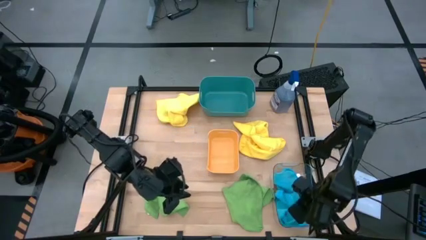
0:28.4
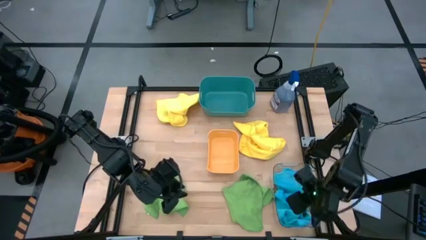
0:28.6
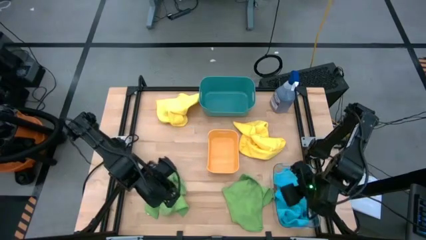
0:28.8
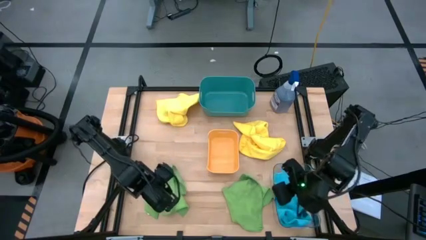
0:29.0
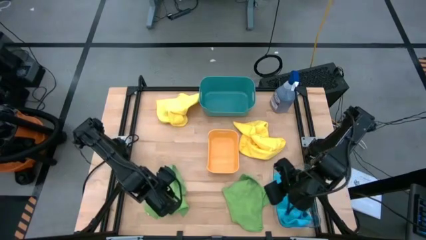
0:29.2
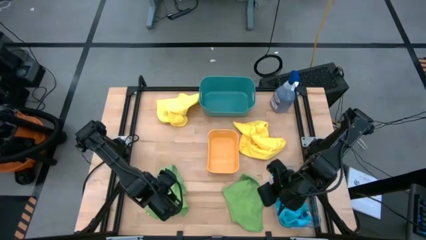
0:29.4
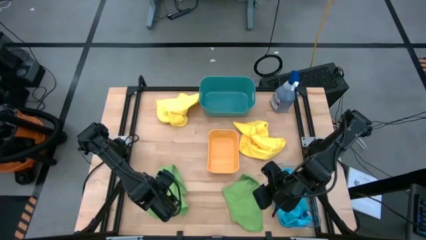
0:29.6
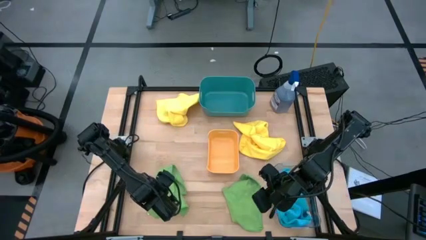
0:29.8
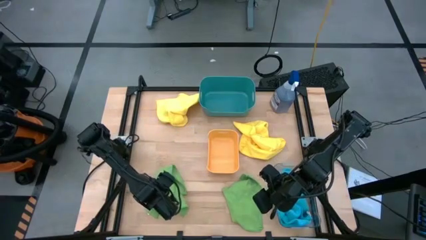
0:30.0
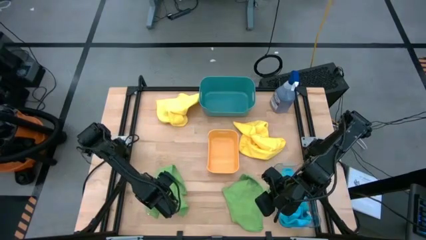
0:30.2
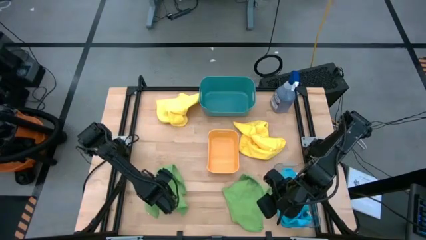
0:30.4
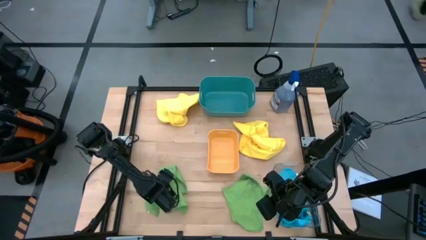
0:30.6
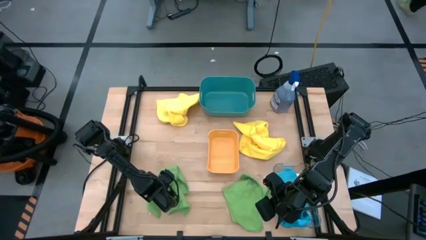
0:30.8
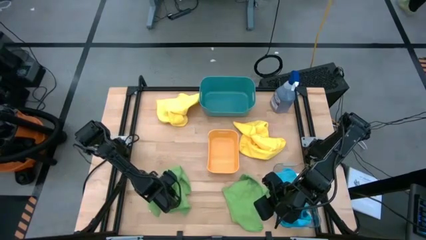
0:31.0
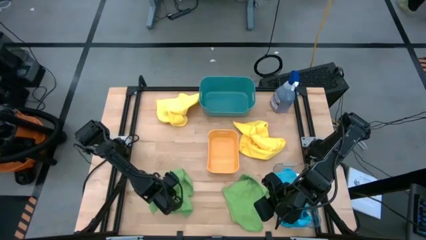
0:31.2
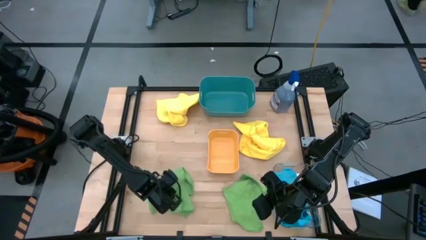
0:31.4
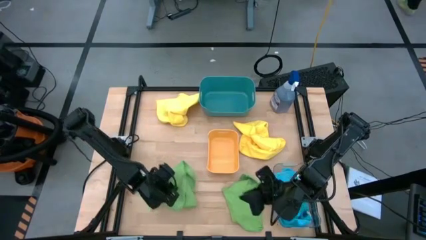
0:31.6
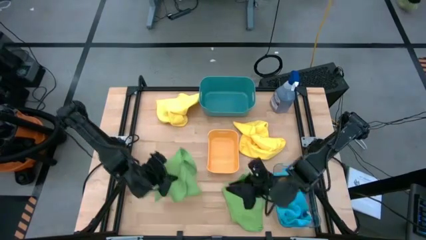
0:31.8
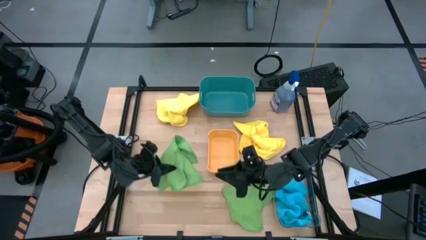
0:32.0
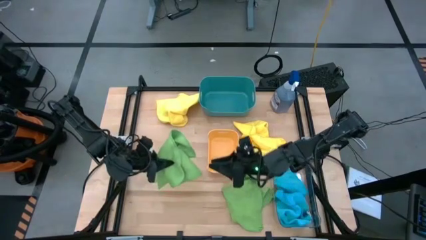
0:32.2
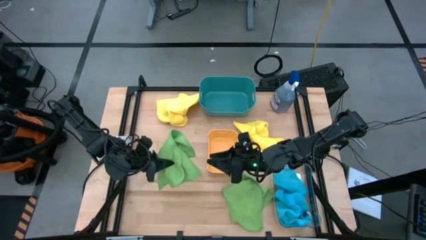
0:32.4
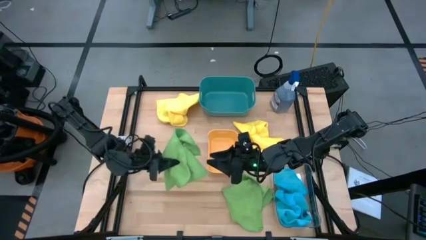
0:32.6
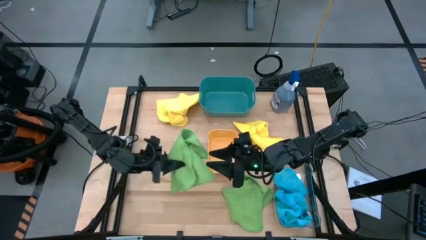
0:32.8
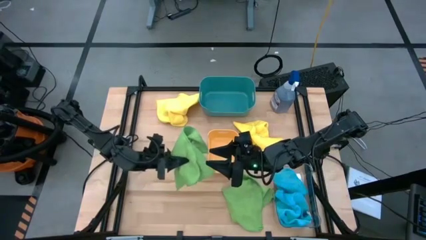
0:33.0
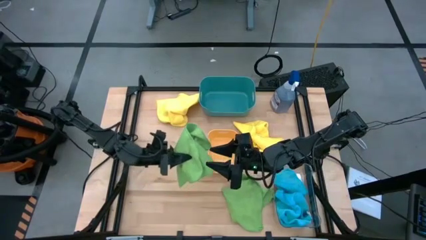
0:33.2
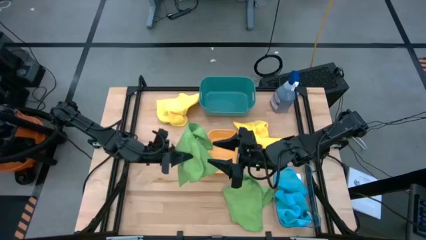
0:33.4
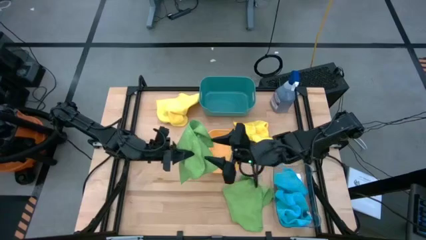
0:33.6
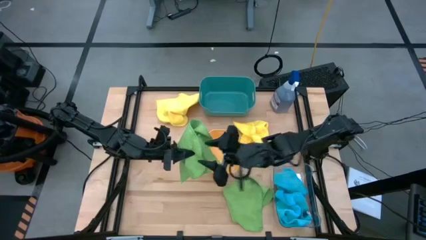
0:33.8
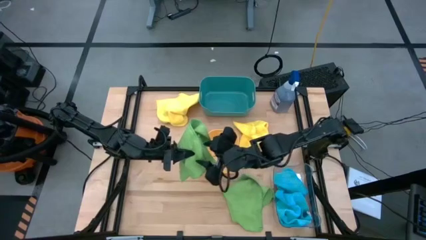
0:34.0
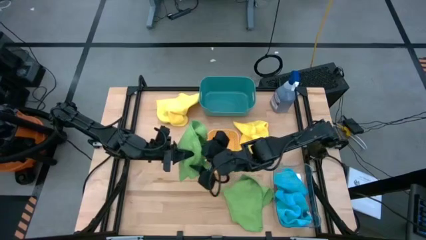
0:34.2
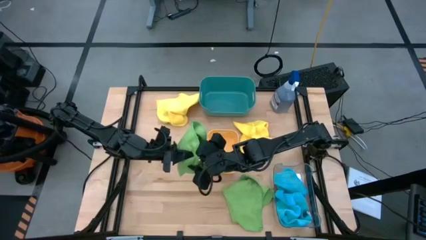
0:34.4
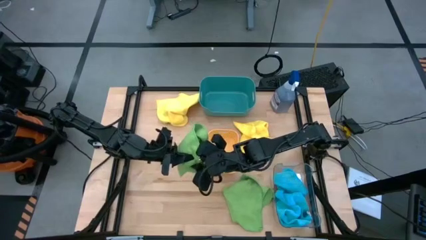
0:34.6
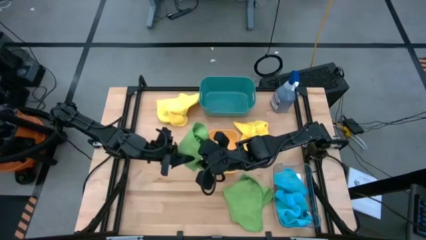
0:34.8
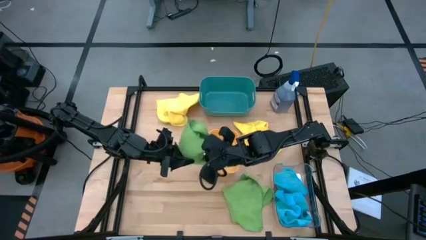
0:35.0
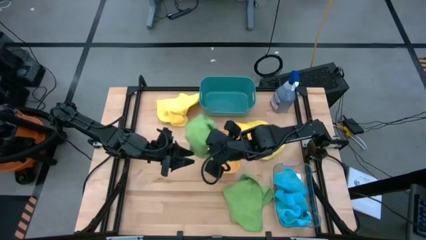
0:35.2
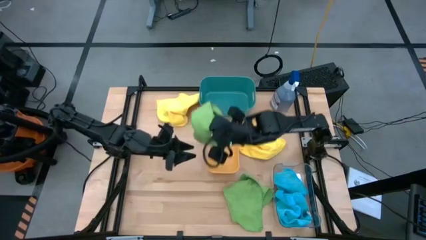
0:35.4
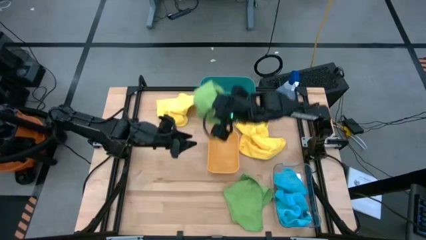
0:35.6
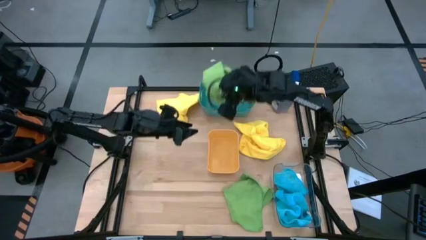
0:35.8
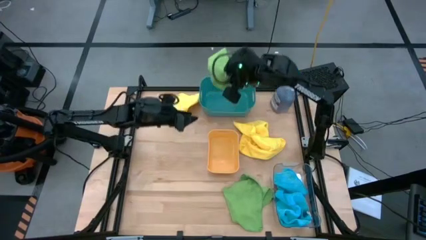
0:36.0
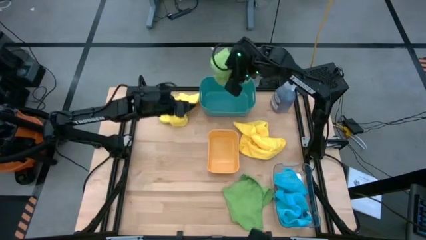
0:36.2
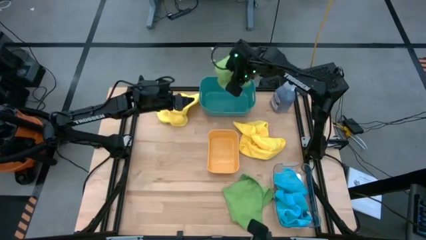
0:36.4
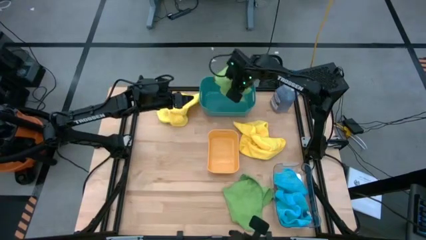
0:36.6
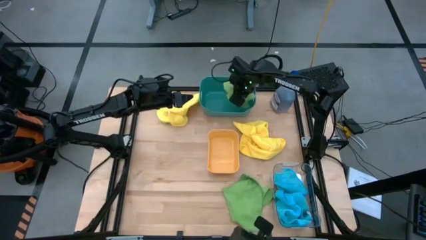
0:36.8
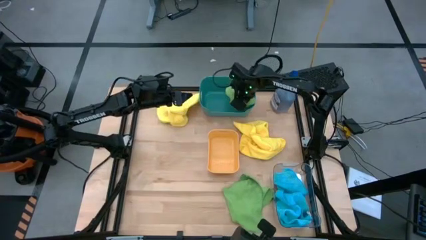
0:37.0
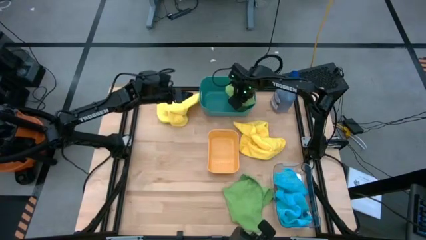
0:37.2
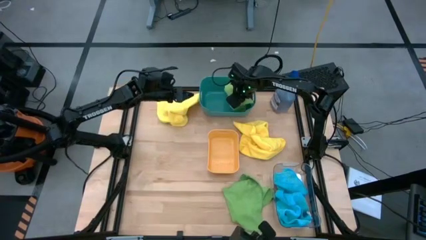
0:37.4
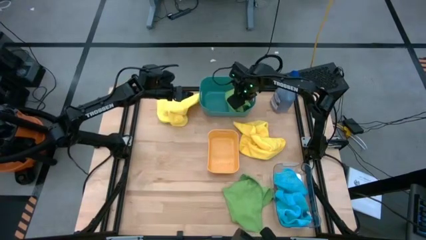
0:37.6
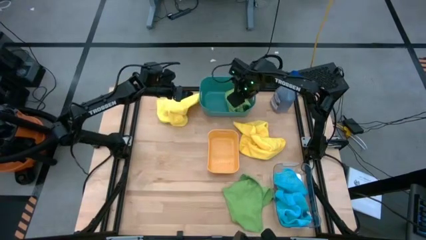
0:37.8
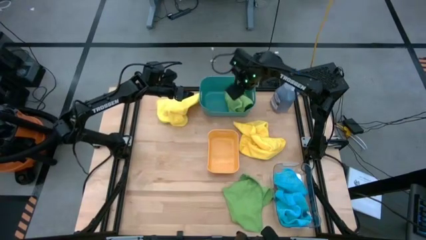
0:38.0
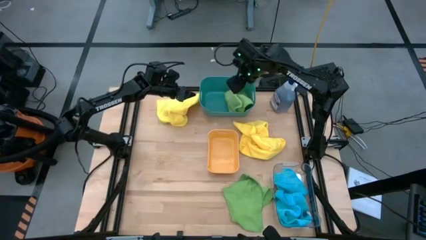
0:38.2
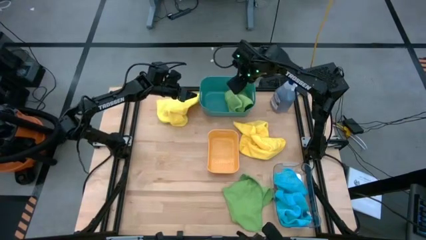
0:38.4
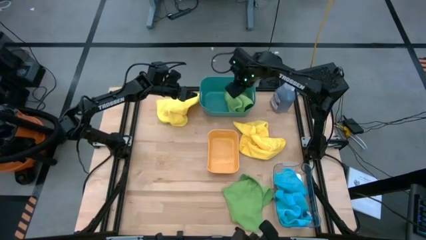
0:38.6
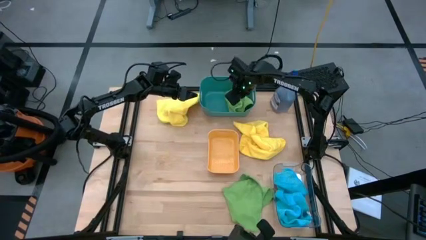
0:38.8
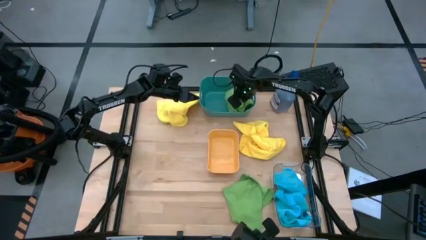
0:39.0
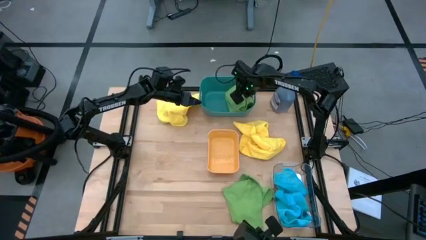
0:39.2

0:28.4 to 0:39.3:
Task: Sort microfiber towel by color & place in baskets
Put the left green microfiber towel into the blue bin

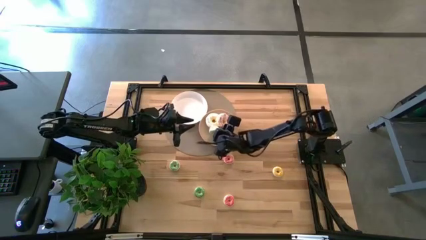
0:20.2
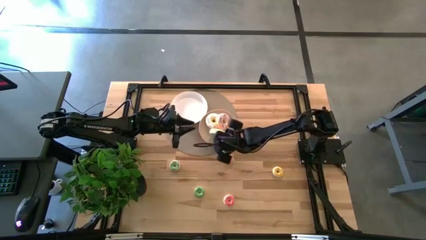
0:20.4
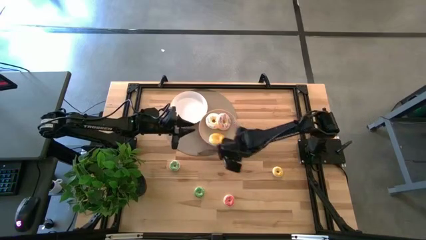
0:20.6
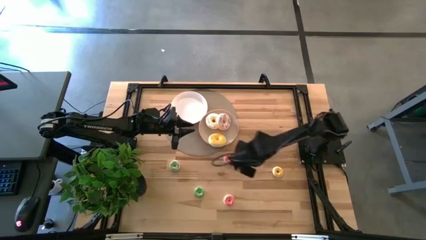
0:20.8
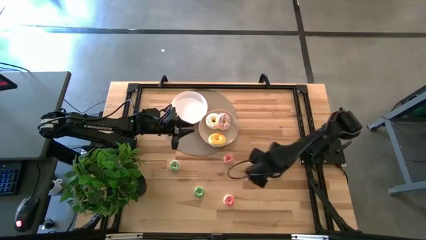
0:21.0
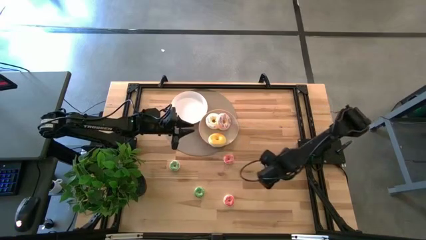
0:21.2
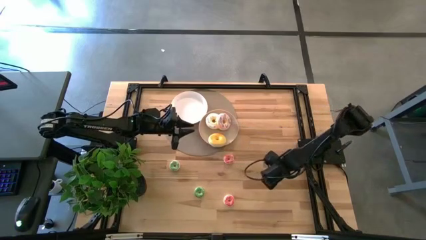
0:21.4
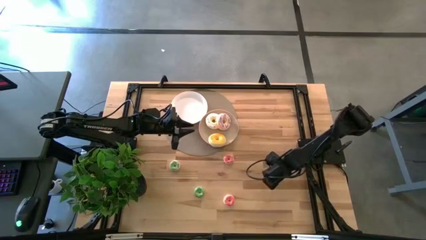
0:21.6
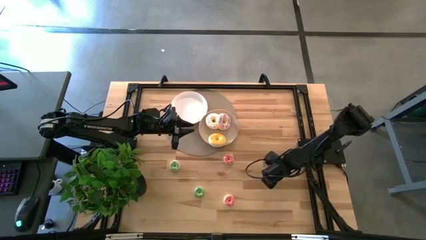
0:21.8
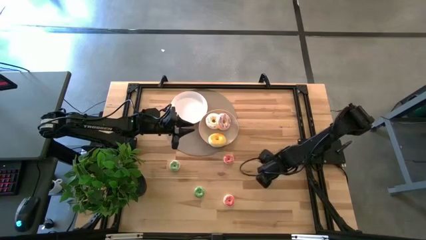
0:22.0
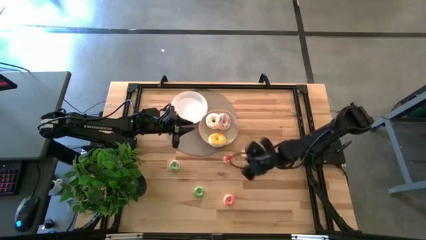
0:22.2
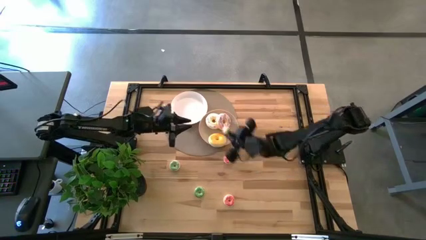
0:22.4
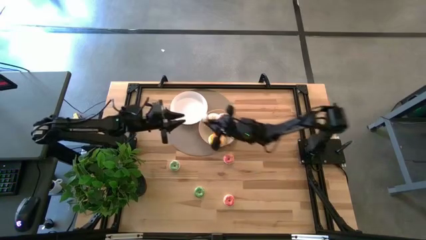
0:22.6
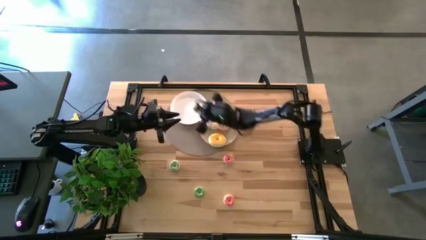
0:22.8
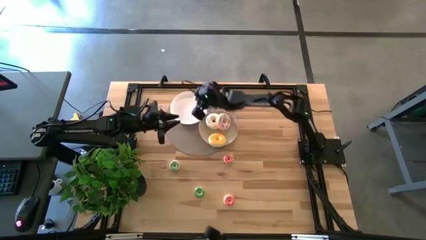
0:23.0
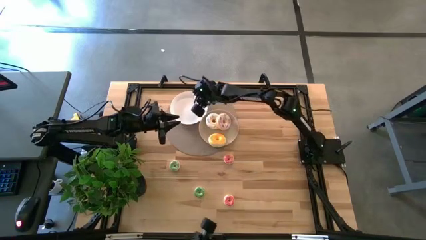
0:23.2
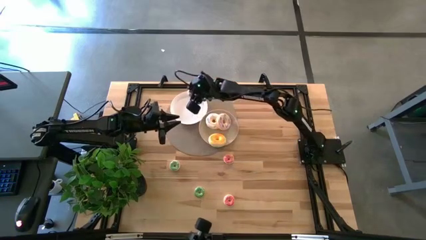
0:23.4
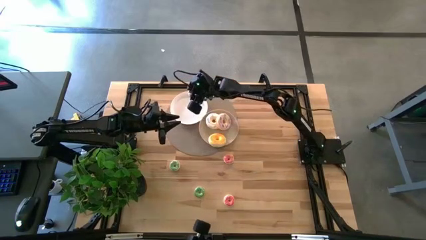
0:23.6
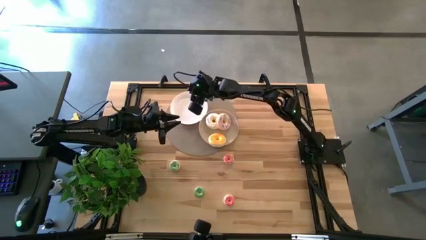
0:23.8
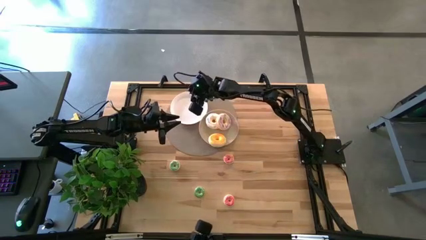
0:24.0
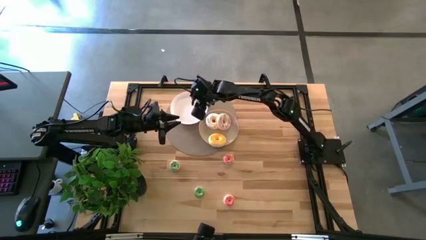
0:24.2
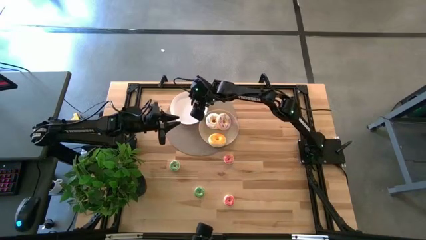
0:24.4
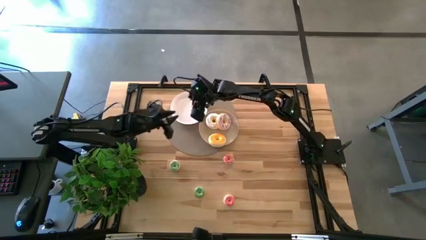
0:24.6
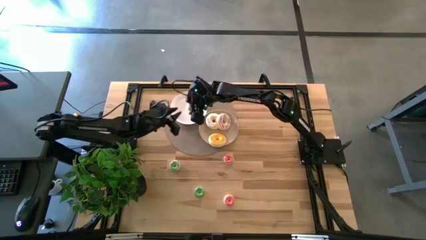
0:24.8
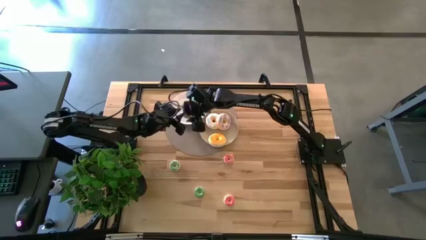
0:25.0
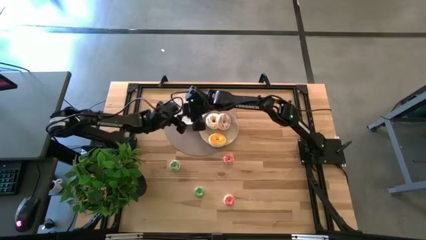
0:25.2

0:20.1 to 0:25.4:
Task: Pick & Place donuts
Put the small yellow doughnut on the white plate

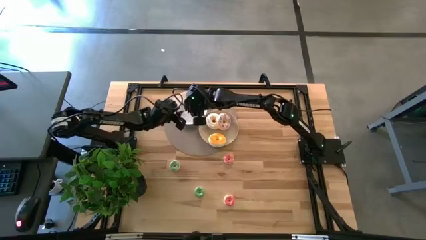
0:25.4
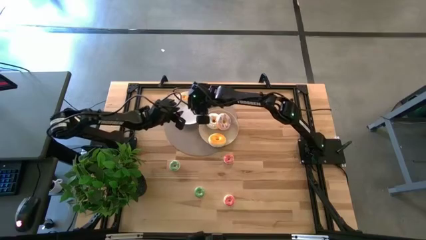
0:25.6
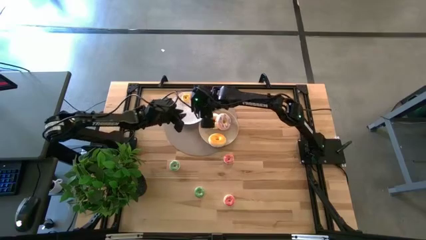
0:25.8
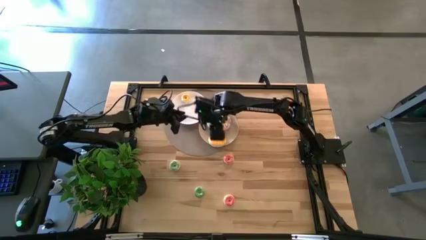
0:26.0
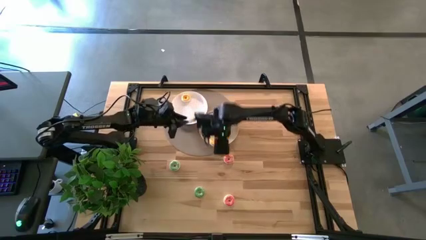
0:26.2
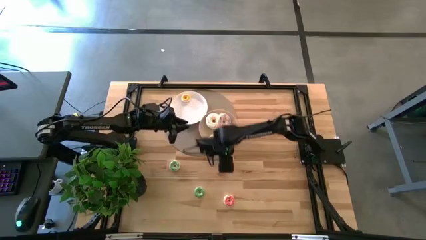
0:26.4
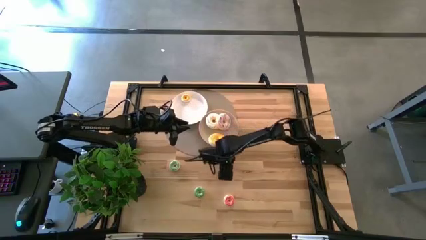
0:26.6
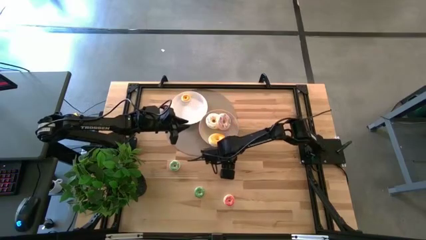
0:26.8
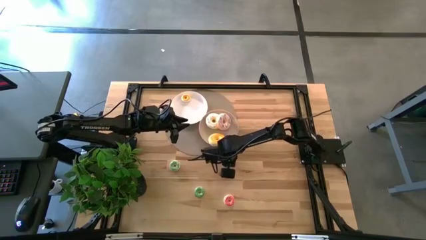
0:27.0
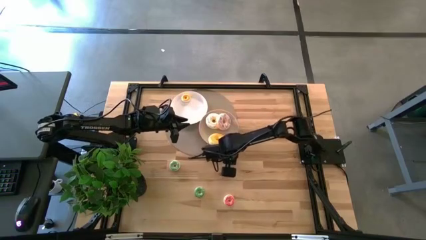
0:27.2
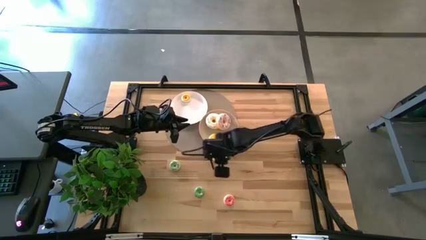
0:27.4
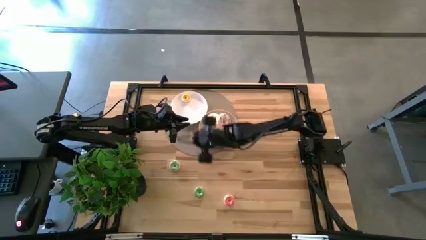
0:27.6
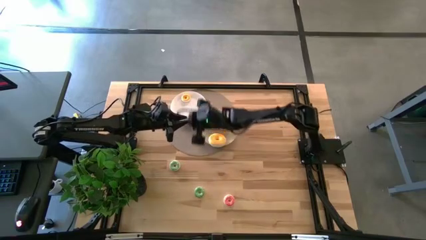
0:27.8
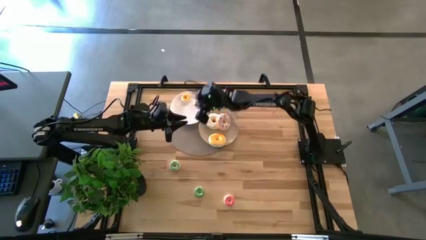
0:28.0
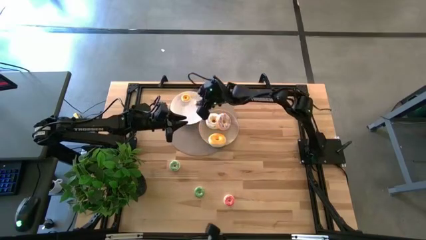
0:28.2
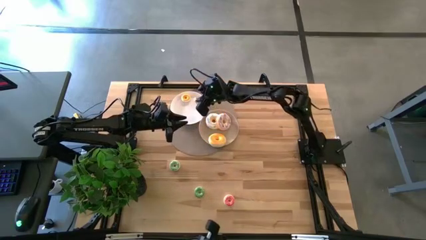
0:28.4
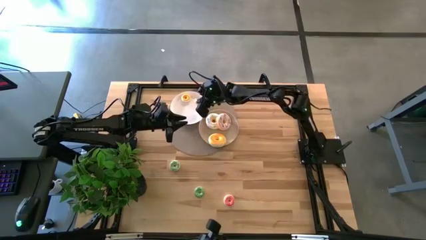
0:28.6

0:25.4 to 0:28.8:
Put the top small pink doughnut on the white plate
